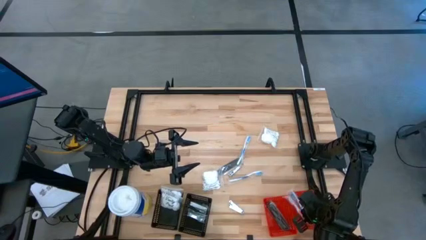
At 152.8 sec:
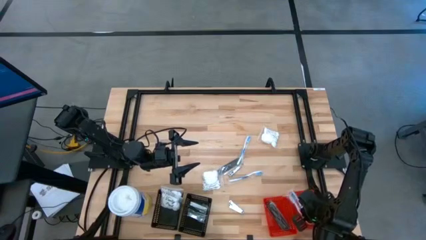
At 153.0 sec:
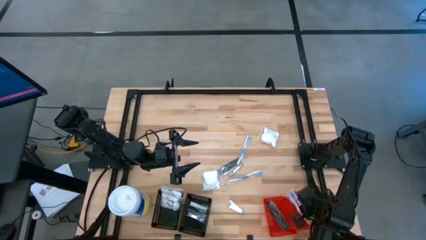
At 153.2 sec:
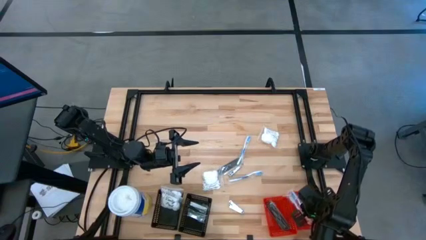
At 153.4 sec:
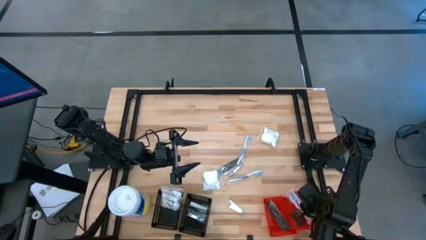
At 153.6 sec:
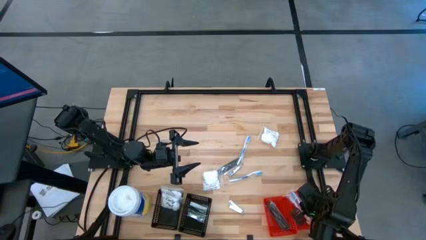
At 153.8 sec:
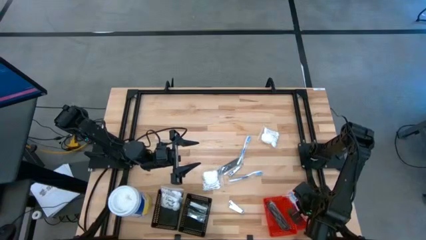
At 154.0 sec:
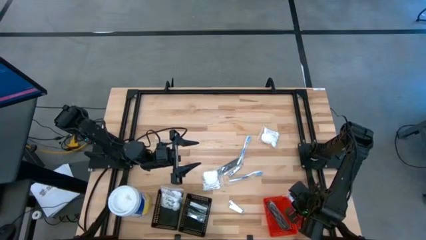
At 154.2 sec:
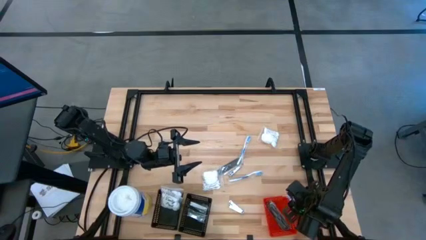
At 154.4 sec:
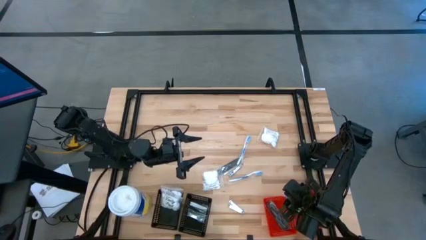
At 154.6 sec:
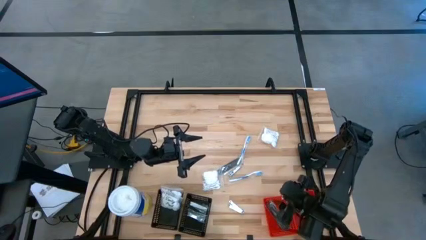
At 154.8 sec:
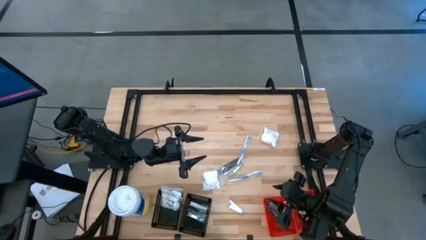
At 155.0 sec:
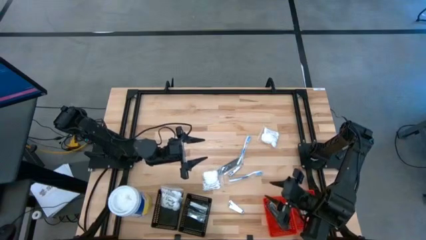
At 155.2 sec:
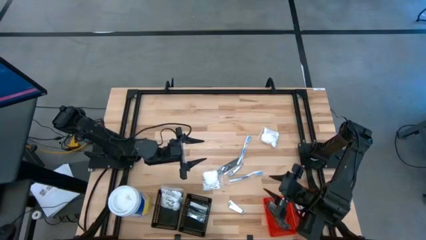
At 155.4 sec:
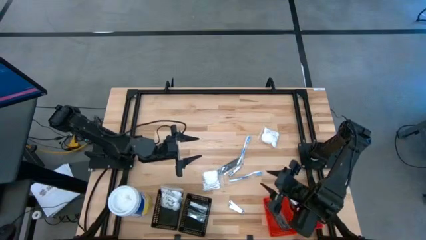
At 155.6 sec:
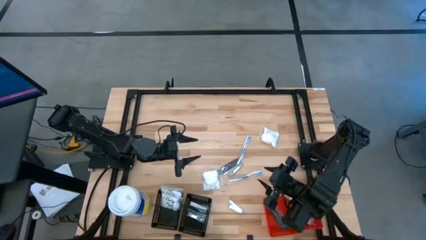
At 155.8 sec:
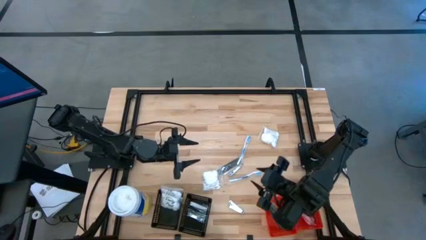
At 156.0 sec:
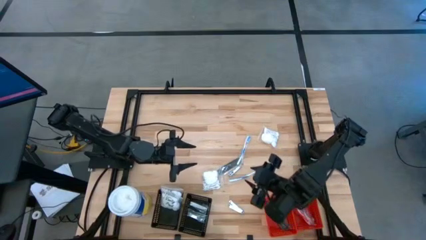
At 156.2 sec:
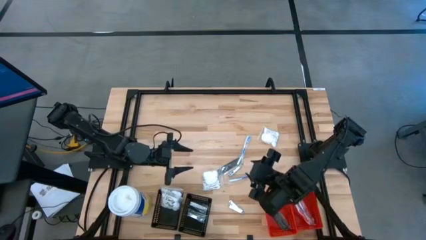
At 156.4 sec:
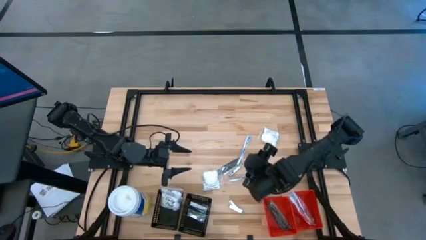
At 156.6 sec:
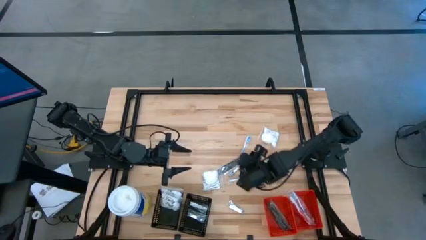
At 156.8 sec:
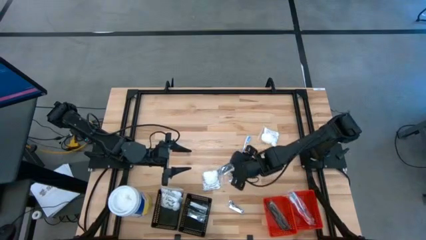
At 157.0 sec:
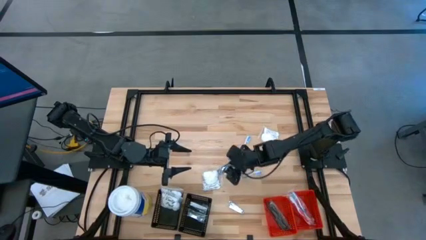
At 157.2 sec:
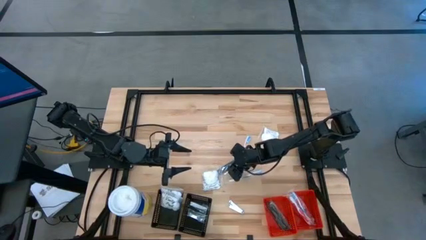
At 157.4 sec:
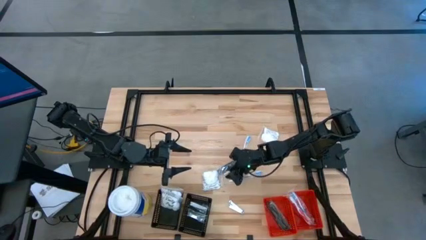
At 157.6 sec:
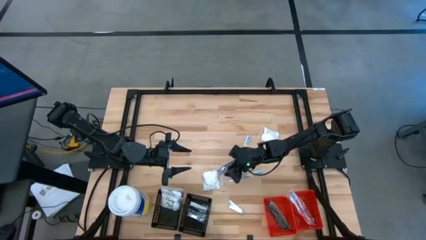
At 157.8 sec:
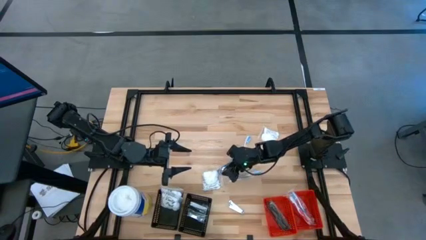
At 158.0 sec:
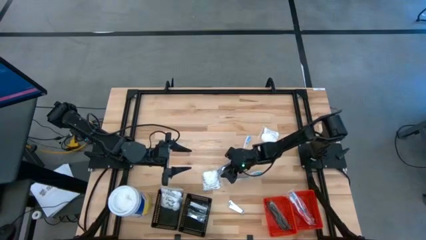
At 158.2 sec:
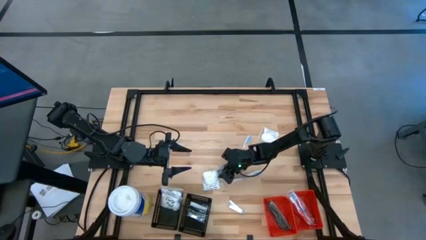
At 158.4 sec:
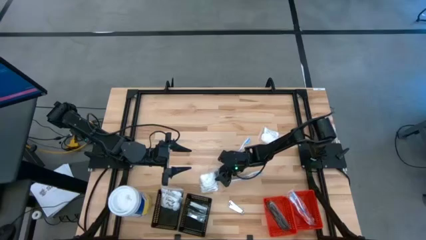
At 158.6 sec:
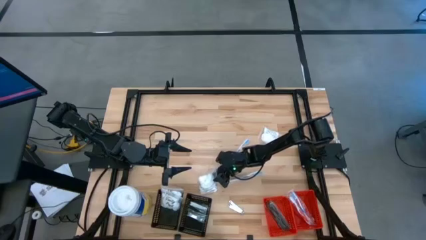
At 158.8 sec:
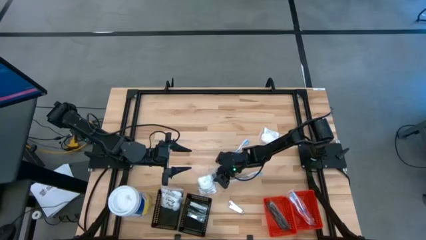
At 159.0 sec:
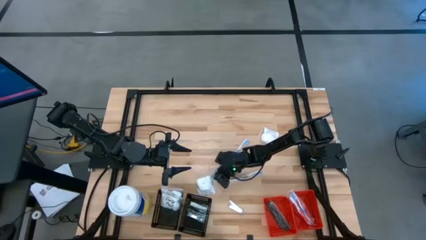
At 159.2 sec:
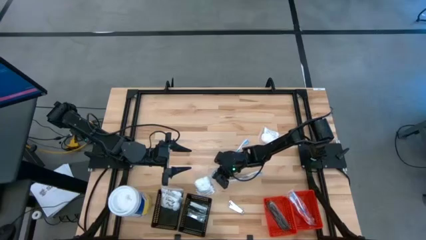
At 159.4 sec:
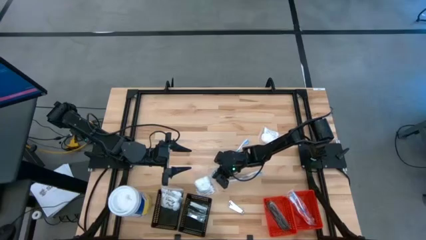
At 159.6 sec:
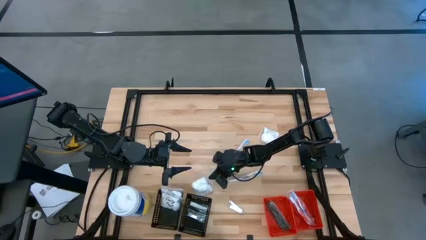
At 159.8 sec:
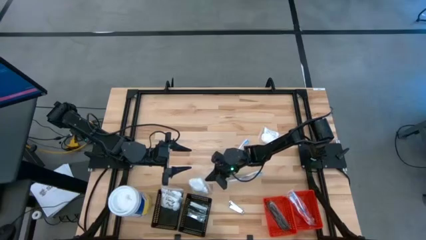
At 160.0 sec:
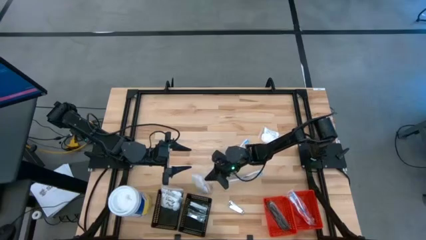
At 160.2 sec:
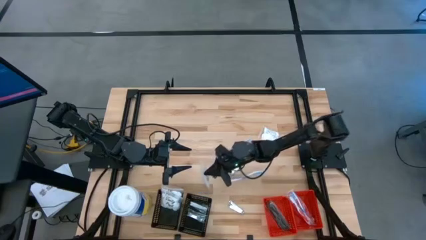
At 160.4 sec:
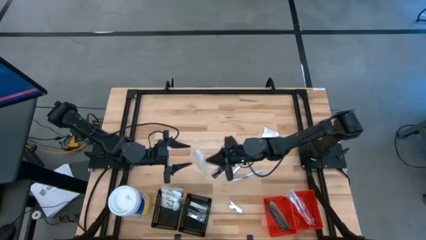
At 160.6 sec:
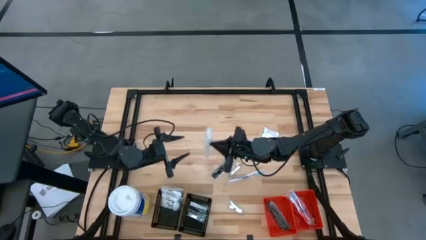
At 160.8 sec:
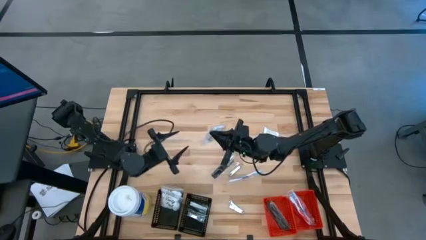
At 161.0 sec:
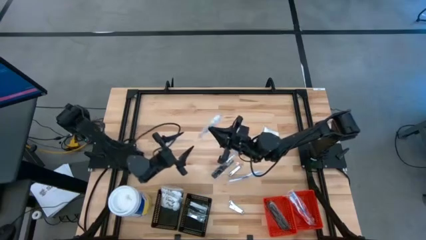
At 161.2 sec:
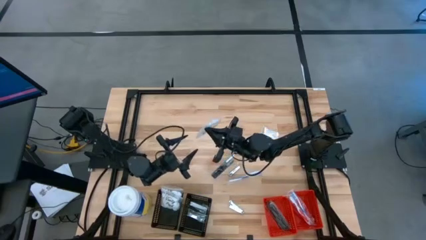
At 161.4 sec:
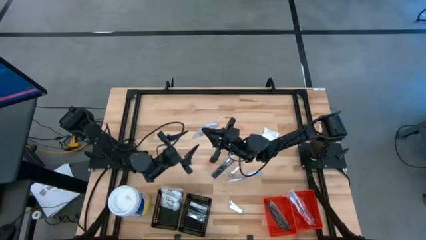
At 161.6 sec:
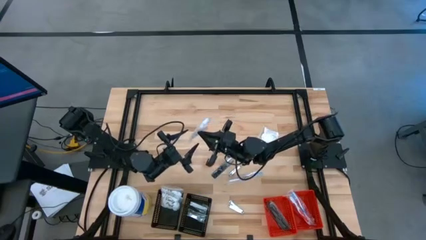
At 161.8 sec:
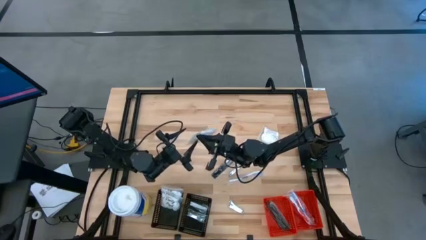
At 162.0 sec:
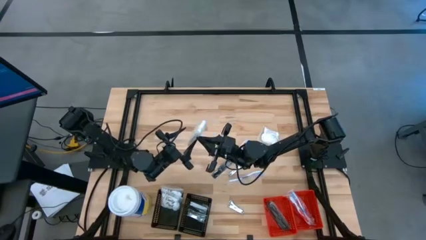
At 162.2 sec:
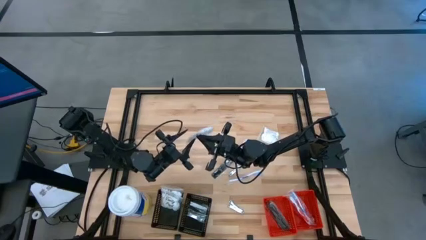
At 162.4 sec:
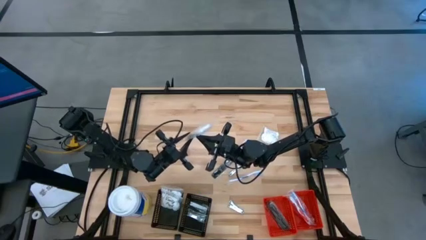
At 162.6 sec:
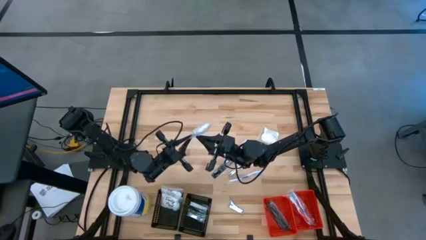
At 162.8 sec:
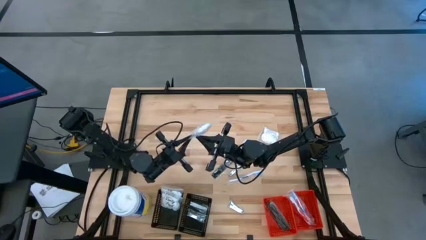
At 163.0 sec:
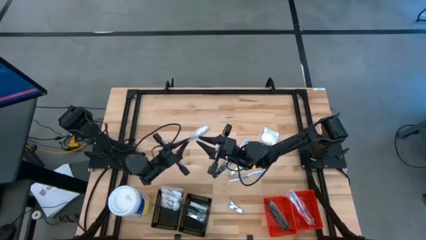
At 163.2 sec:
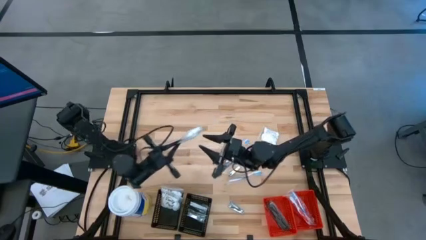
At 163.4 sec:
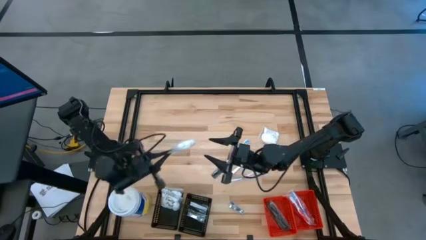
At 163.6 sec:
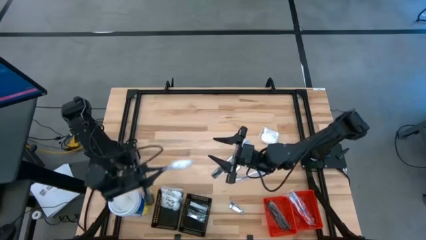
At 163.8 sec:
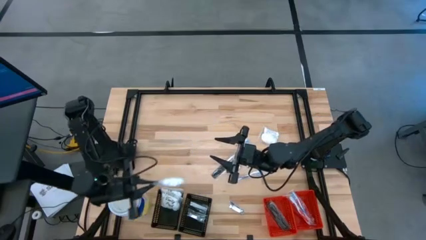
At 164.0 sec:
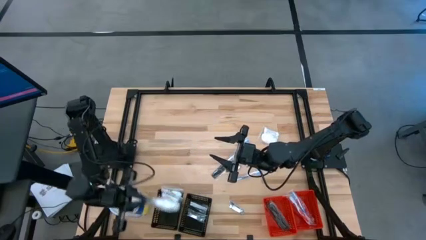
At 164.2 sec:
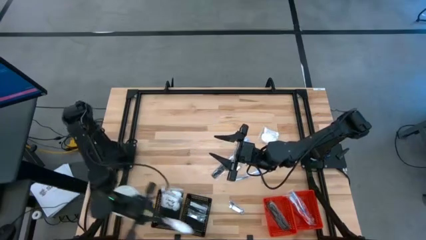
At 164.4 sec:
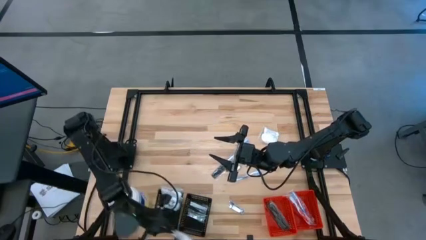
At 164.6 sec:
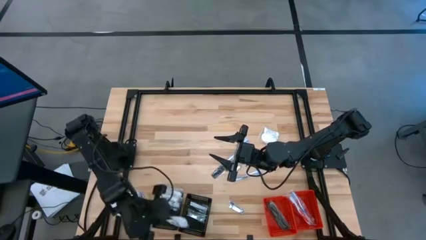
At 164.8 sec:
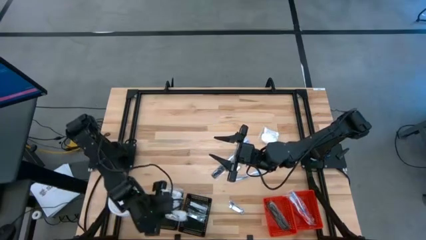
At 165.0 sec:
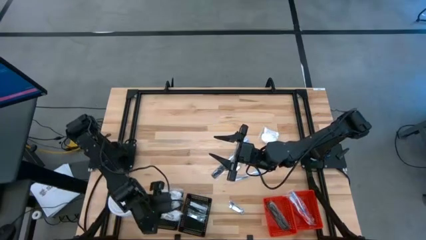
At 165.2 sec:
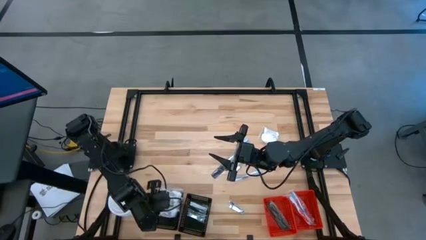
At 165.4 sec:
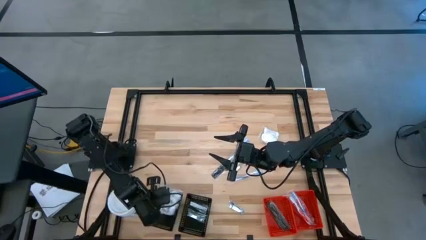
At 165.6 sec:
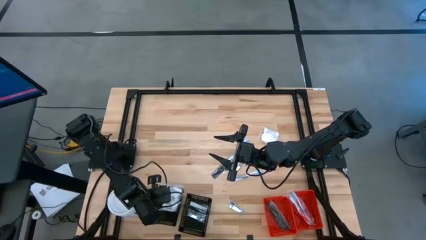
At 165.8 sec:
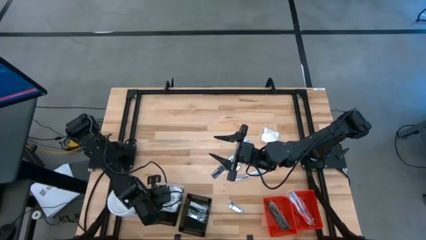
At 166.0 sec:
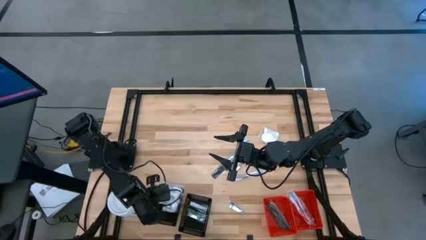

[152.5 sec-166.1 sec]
Task: Pick & Place Travel size toiletries
Put the cotton pack into the left black bin

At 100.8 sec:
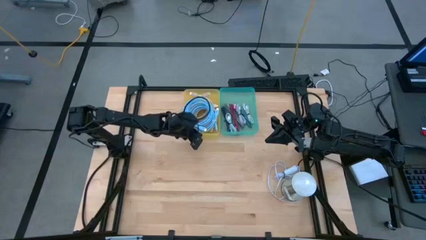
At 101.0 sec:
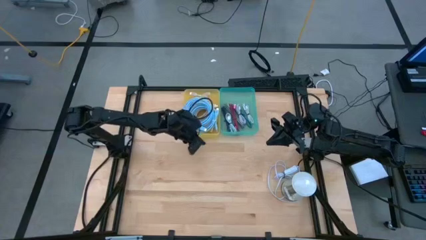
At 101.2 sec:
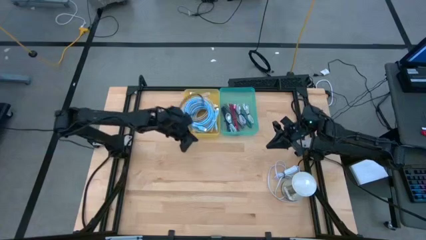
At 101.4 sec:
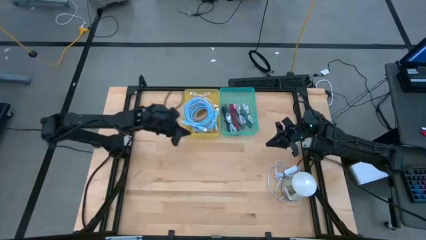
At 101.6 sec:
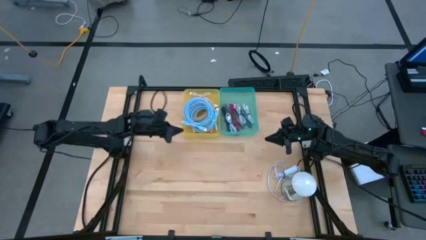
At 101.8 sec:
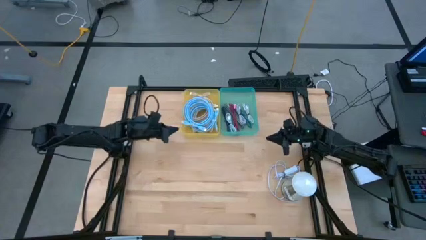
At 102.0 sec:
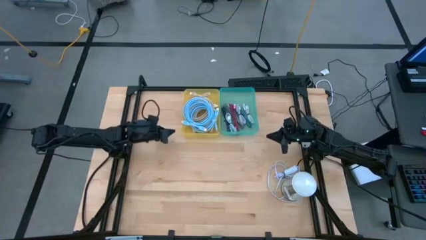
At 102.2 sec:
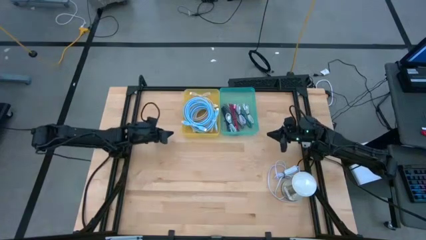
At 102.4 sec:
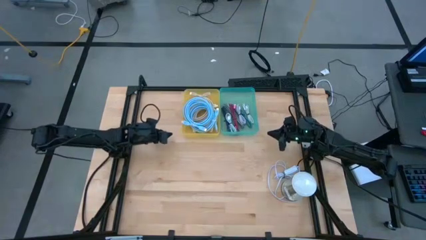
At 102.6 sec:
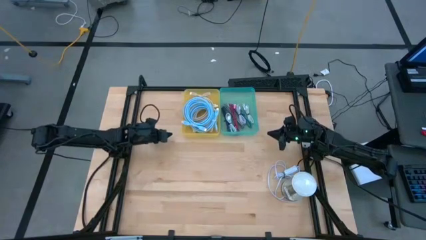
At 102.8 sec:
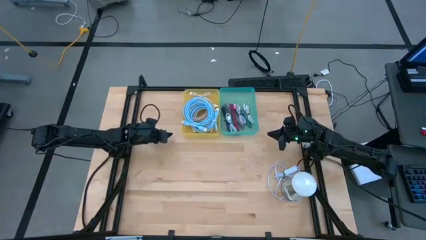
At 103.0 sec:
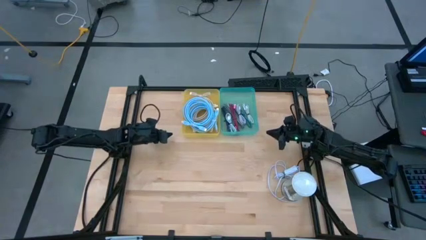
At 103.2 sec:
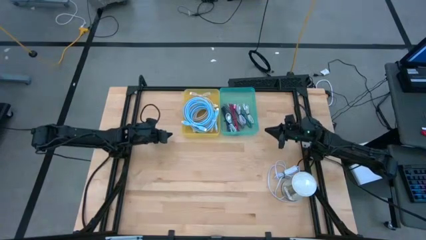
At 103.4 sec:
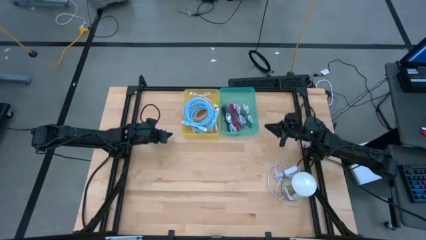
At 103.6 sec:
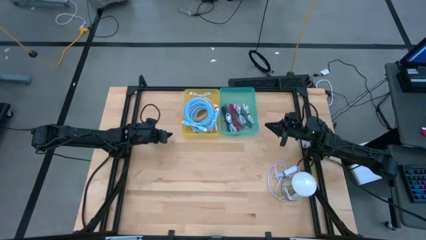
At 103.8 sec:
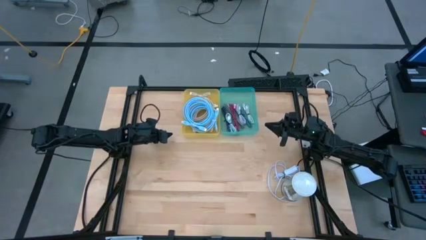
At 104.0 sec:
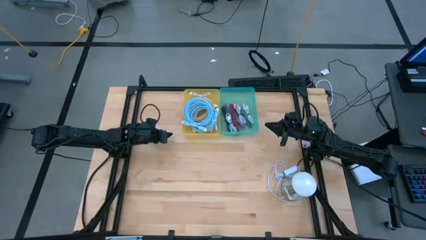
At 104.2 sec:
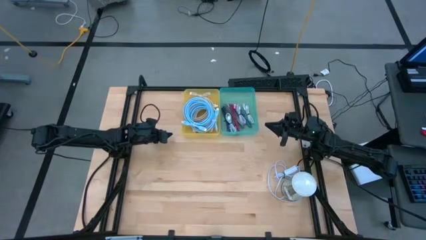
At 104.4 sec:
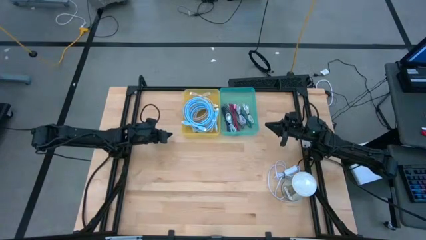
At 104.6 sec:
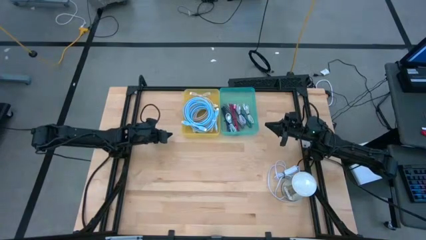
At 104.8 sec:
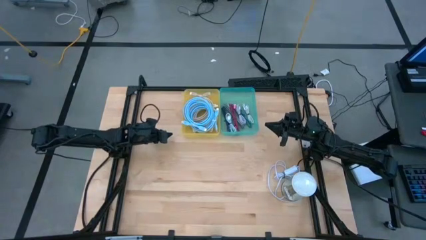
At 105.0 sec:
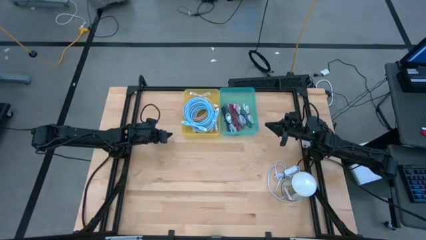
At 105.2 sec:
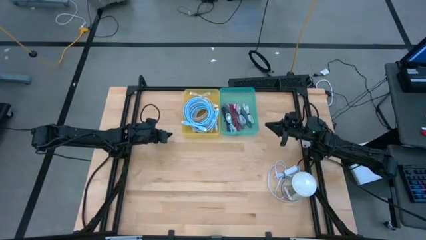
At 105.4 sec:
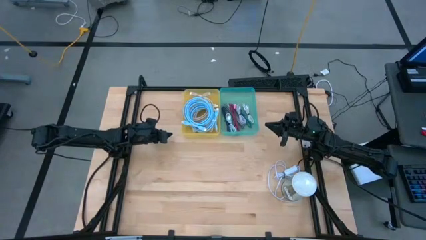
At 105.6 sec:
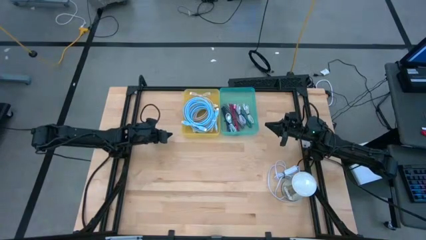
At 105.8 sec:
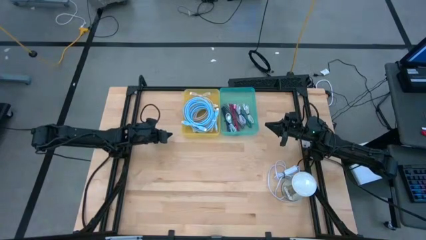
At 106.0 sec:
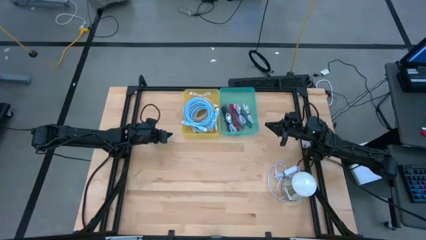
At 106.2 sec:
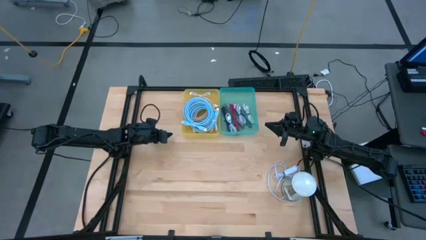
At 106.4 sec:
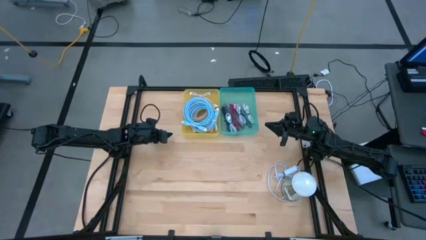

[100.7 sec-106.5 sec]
Task: Pick and place USB-C Cables
Return to Home Position
